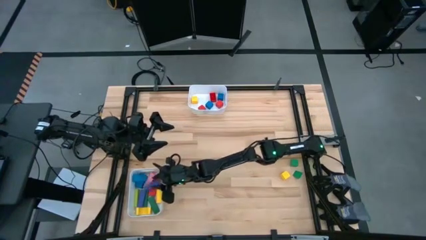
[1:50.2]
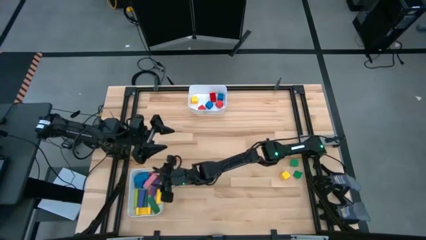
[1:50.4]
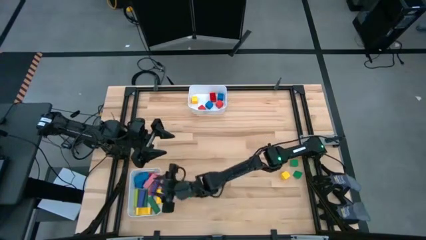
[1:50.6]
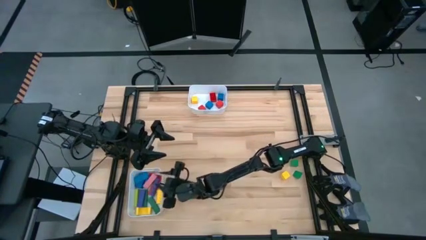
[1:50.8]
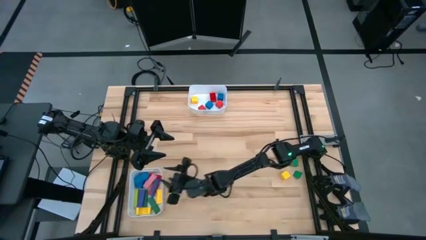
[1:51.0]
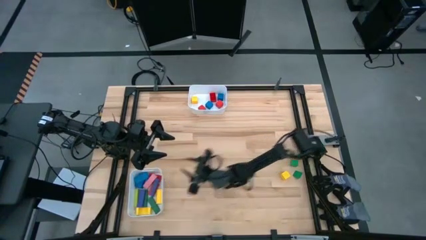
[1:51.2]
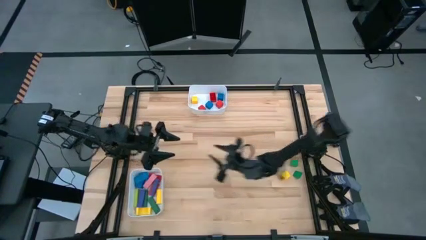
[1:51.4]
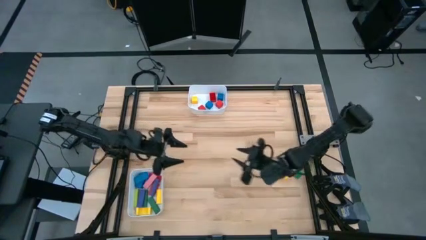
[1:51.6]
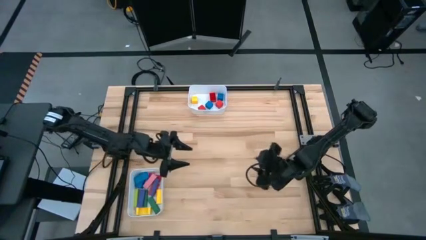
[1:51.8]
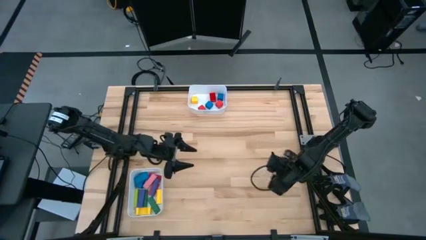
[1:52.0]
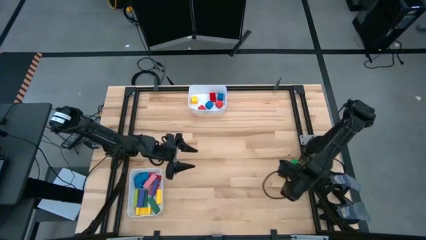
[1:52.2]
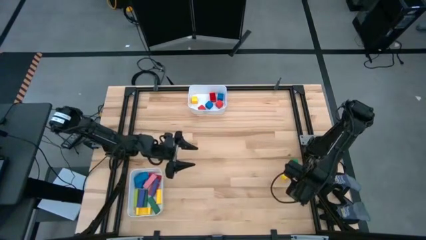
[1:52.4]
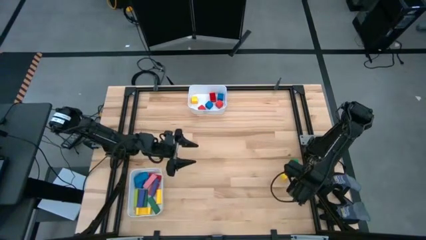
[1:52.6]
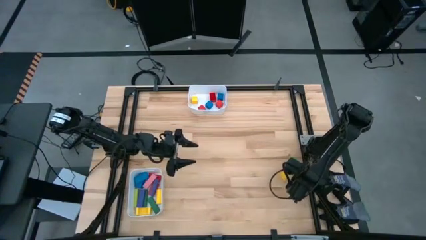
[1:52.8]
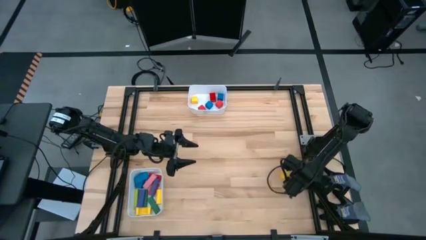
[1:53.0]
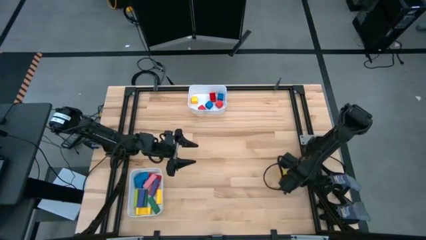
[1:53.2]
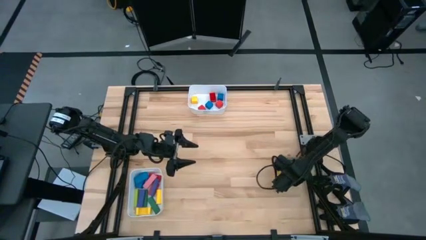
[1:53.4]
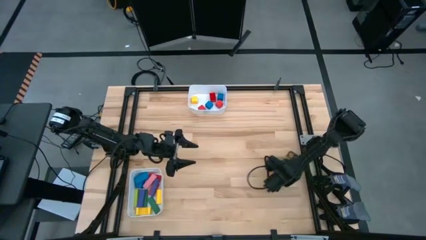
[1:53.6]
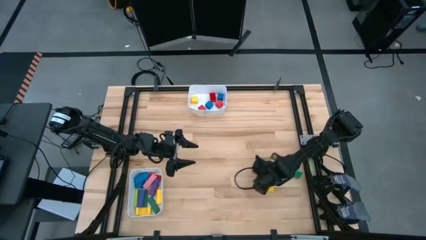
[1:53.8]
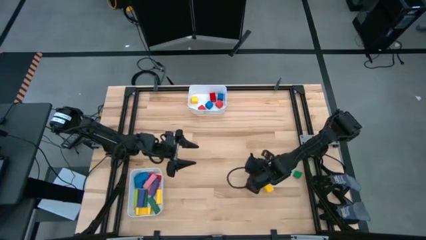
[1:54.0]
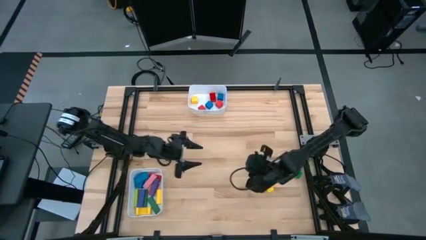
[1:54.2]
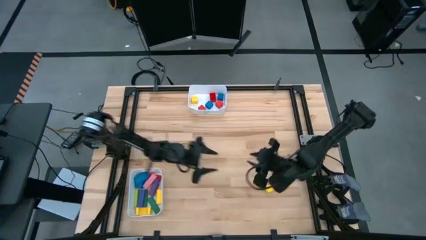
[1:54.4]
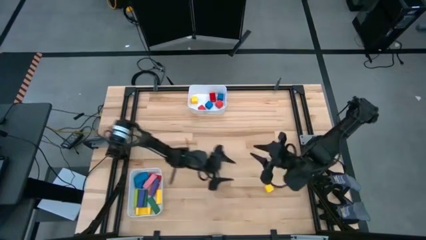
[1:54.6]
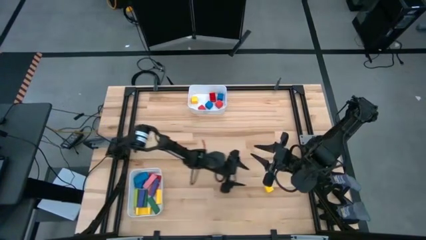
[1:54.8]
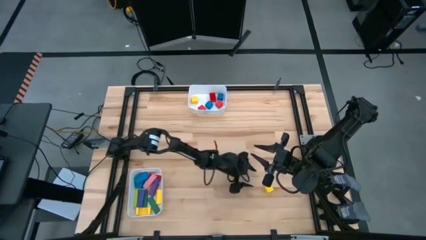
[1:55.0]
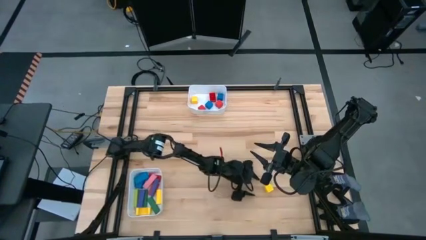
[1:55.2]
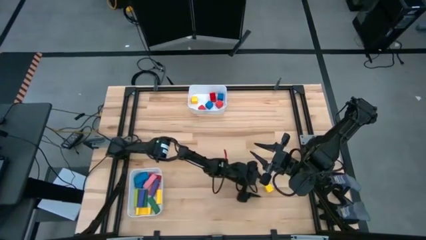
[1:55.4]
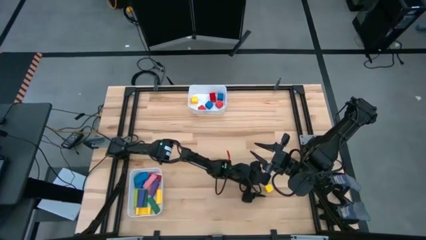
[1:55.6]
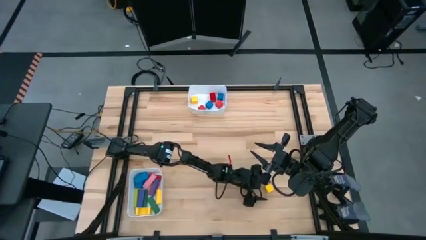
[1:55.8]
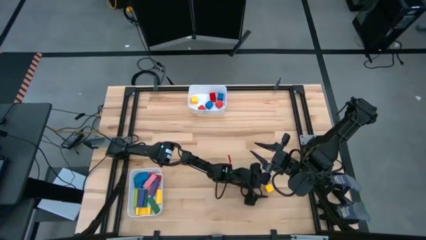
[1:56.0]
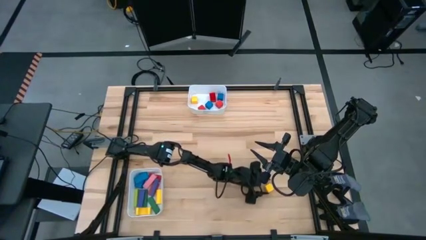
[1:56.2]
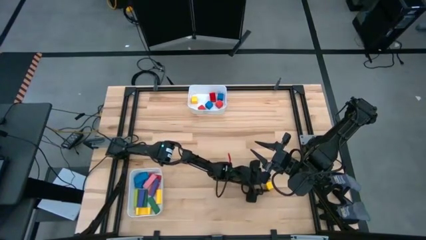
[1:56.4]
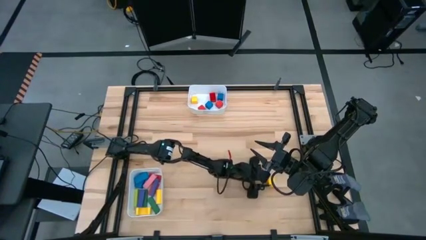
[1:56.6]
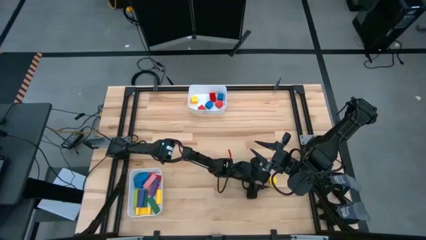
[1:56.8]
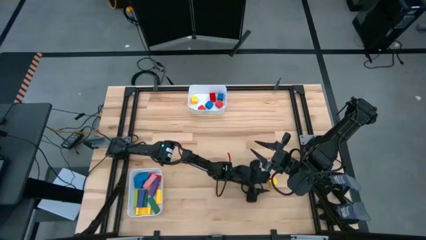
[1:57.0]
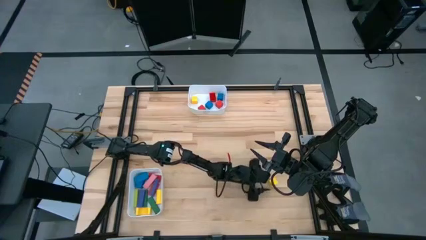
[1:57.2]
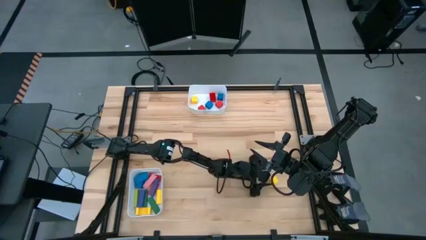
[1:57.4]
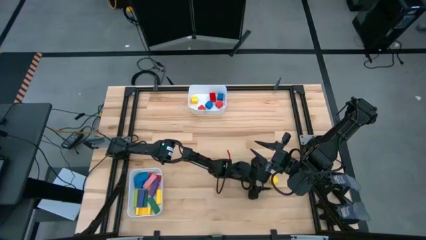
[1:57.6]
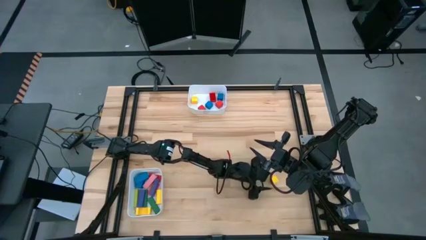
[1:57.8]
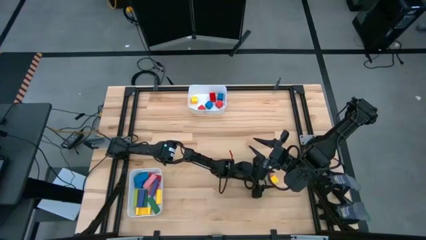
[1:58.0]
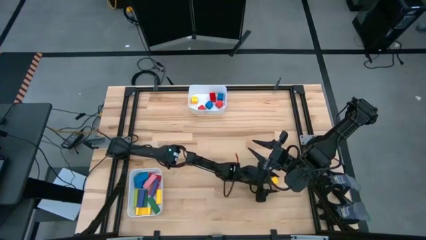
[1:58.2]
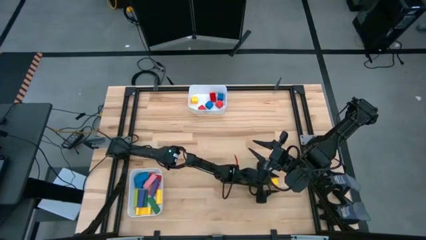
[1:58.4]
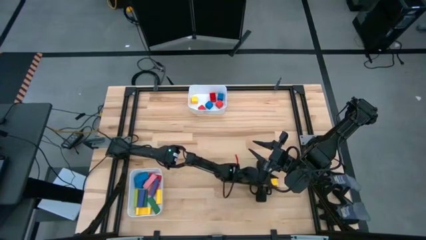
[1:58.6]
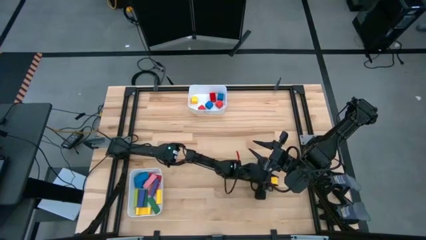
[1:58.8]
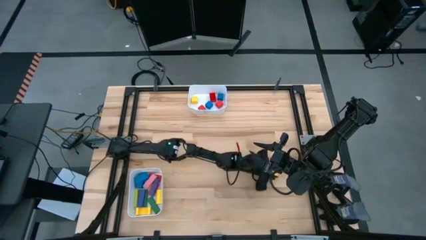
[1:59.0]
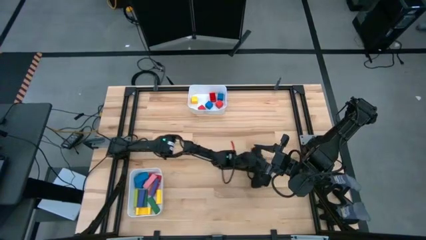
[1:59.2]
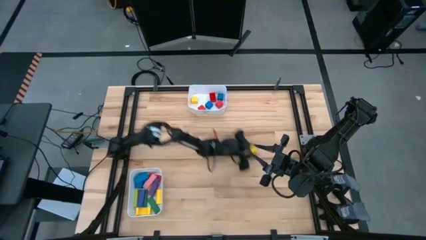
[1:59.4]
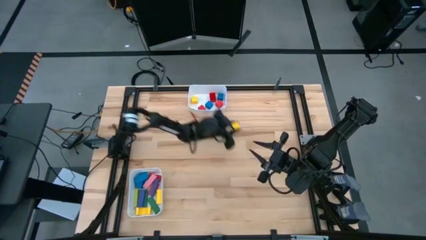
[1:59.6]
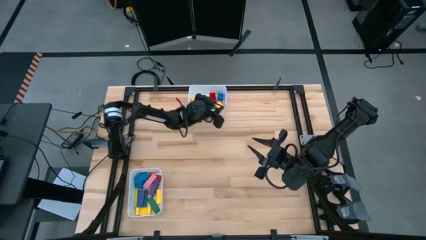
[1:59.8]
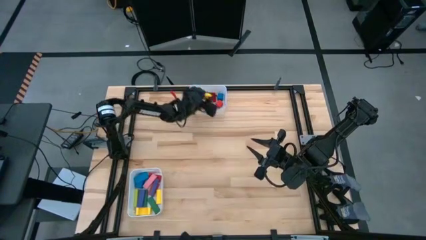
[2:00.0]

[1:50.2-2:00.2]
Task: Sort blocks by size
Put the yellow cube block into the top white bin

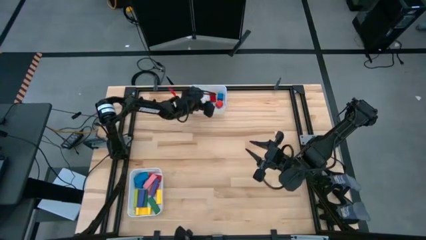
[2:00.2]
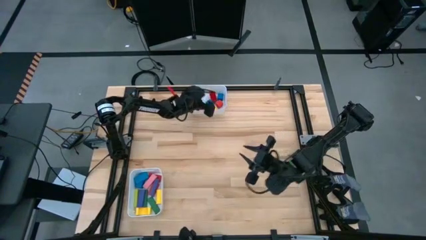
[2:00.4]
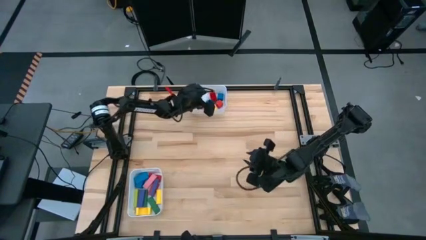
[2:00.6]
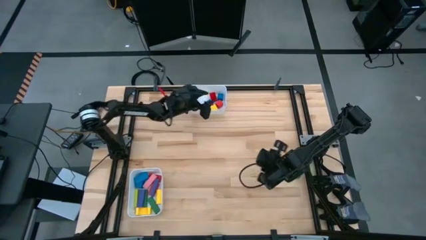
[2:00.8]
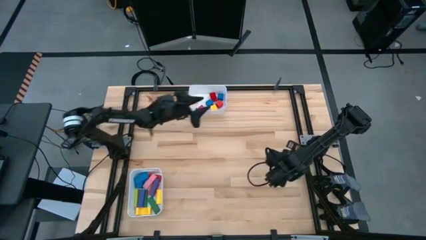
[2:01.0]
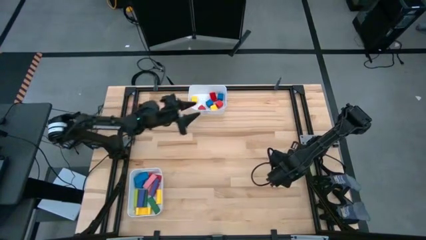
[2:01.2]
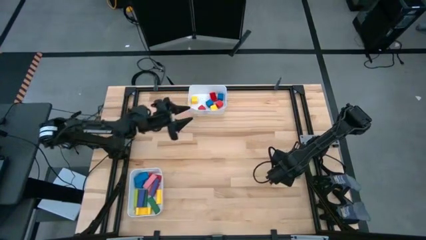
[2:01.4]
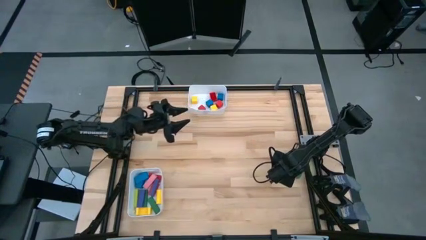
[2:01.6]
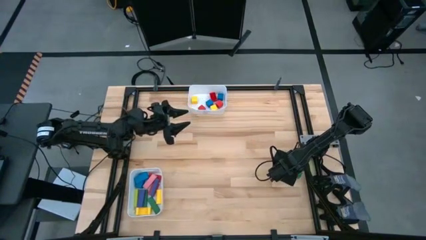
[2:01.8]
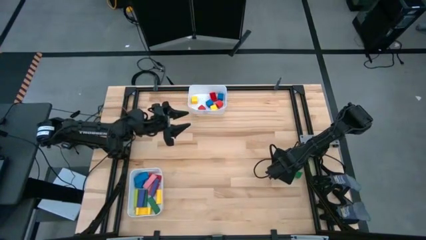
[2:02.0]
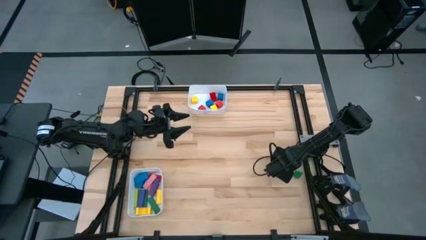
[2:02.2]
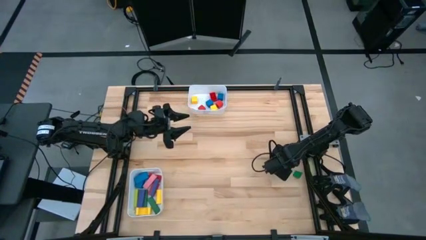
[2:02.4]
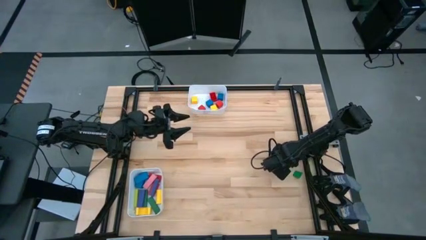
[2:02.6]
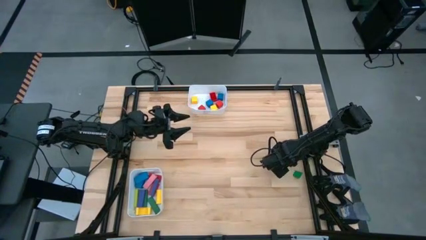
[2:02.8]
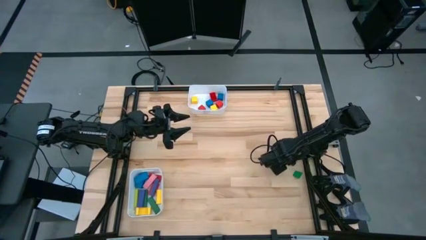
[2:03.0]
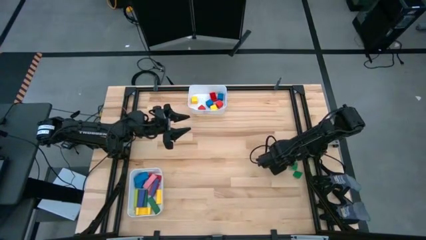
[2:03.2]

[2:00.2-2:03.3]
Put the green cube block into the top white bin

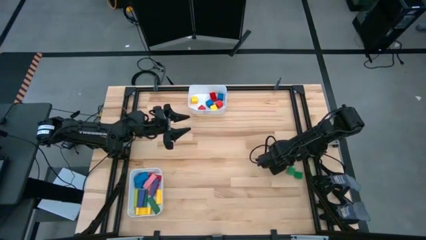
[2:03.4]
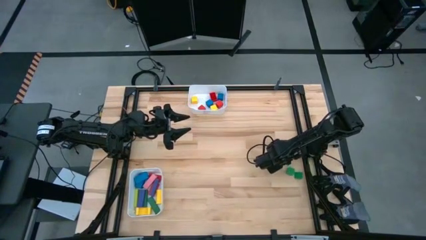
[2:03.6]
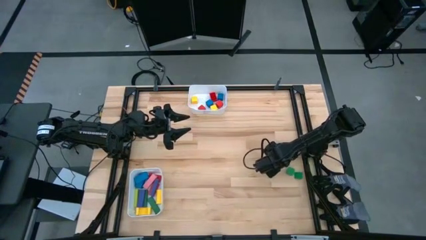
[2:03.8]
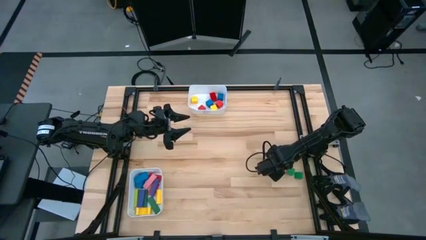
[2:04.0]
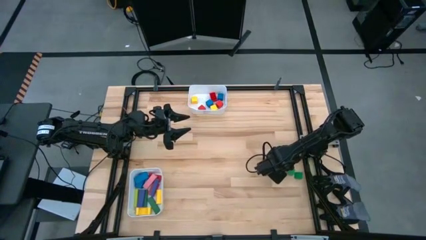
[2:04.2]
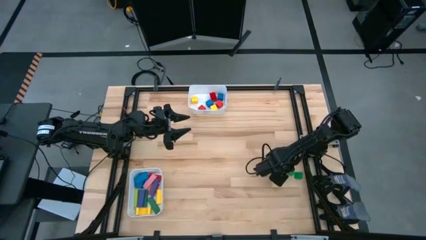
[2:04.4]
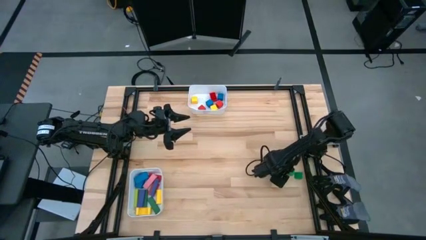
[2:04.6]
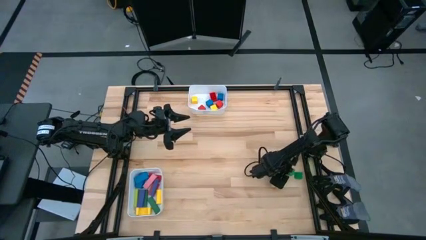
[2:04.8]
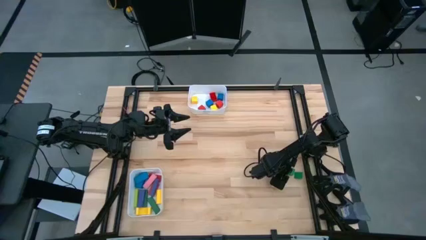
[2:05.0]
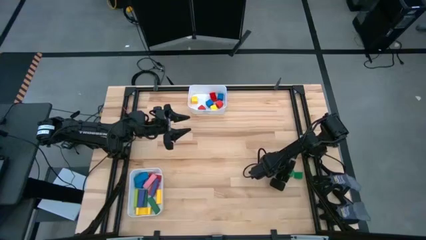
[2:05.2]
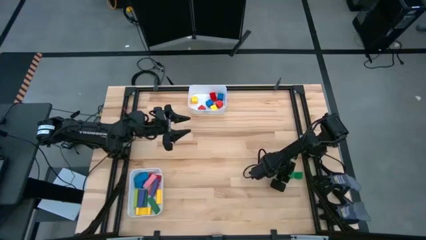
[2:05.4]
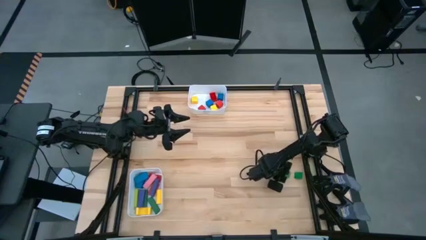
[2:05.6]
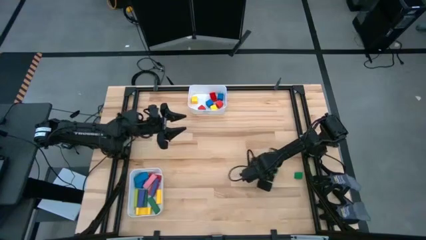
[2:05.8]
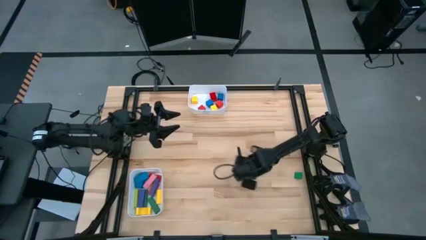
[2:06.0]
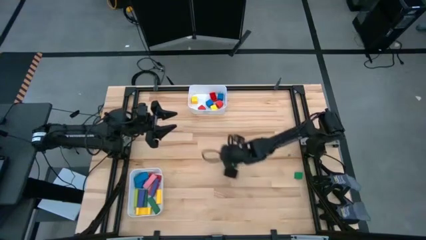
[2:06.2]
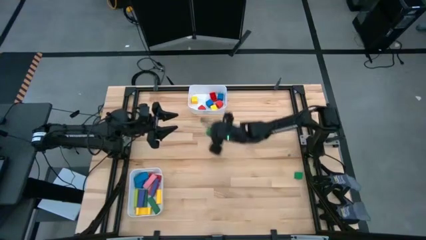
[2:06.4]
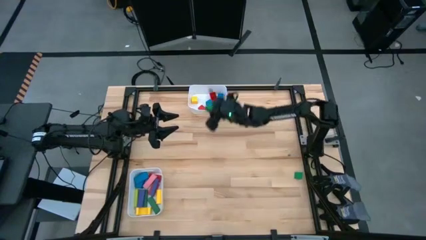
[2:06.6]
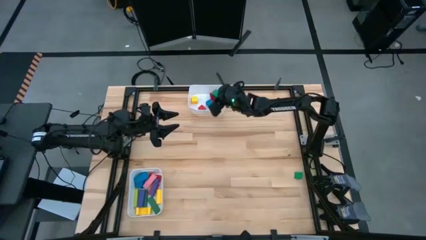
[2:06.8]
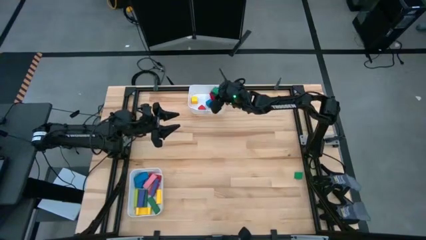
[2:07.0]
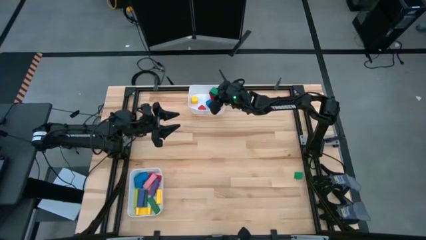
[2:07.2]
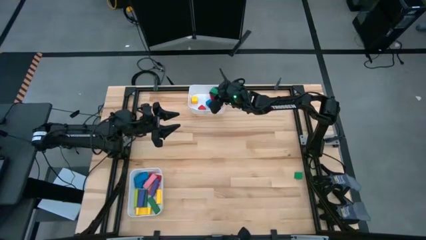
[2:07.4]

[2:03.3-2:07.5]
Put the green cube block into the top white bin
